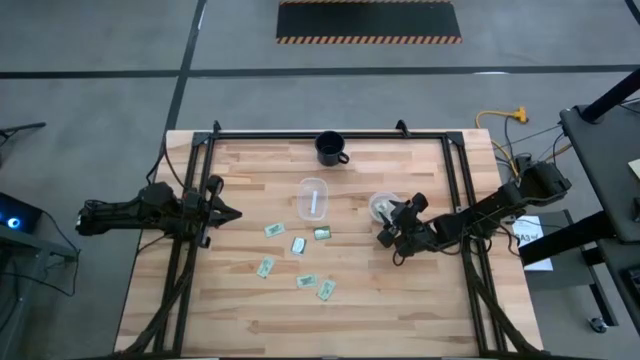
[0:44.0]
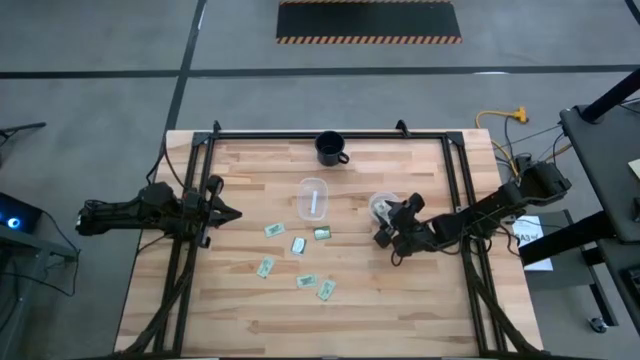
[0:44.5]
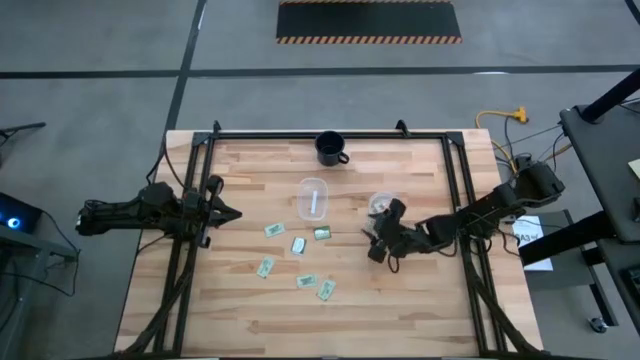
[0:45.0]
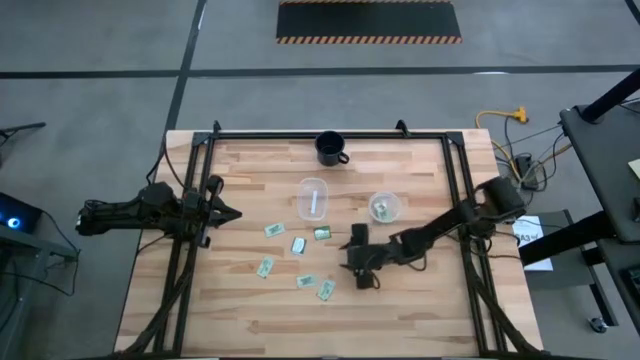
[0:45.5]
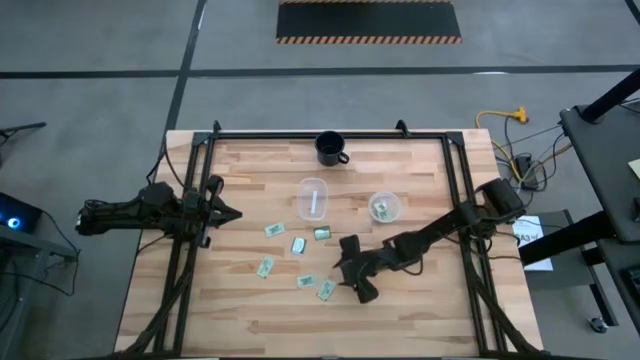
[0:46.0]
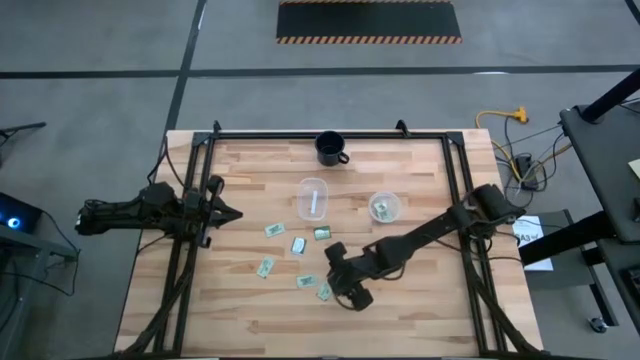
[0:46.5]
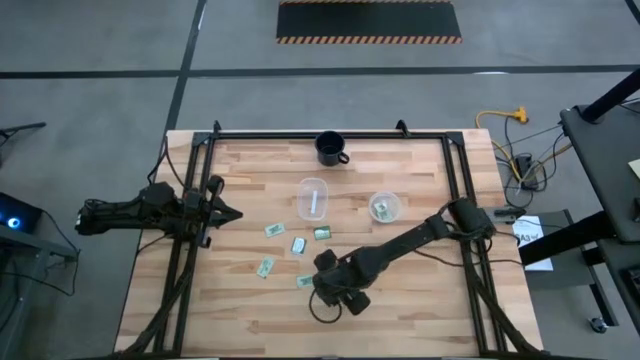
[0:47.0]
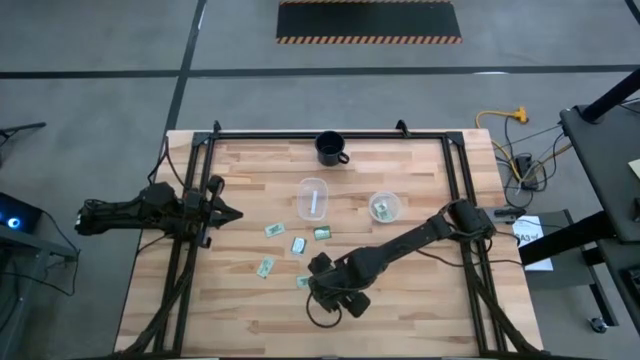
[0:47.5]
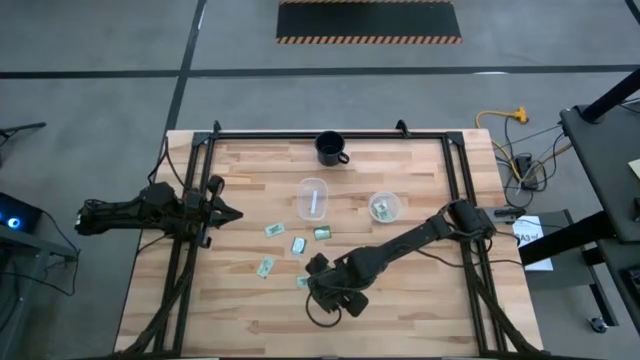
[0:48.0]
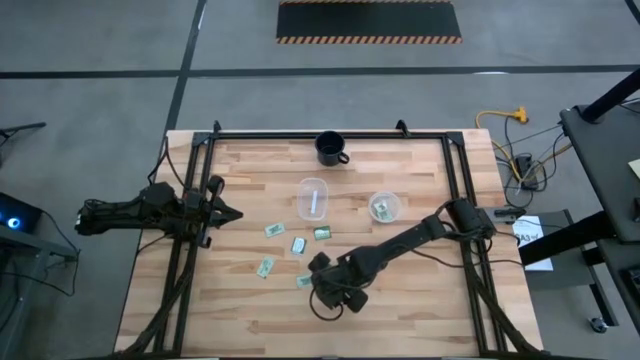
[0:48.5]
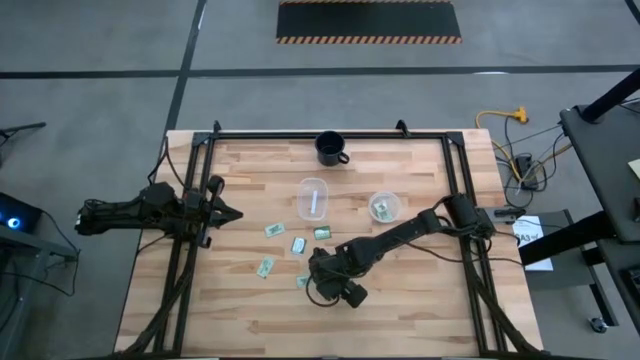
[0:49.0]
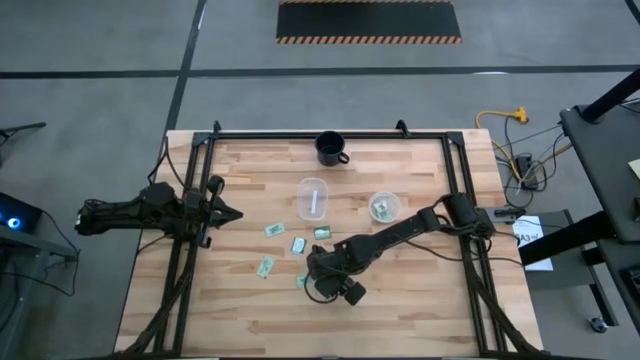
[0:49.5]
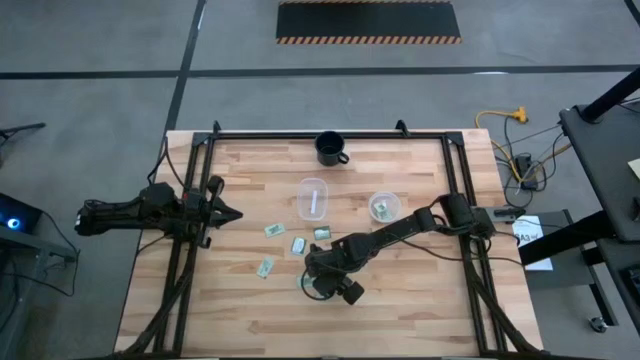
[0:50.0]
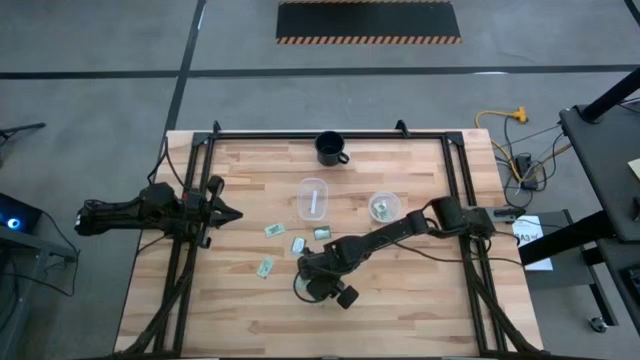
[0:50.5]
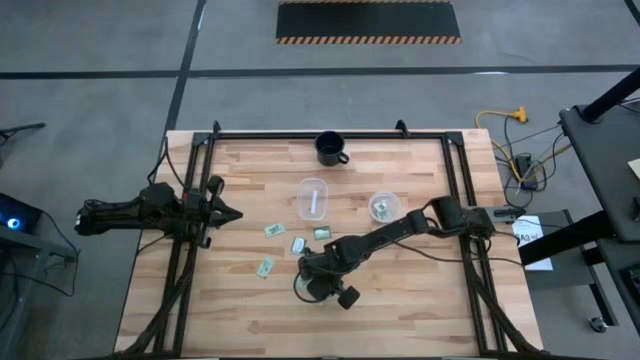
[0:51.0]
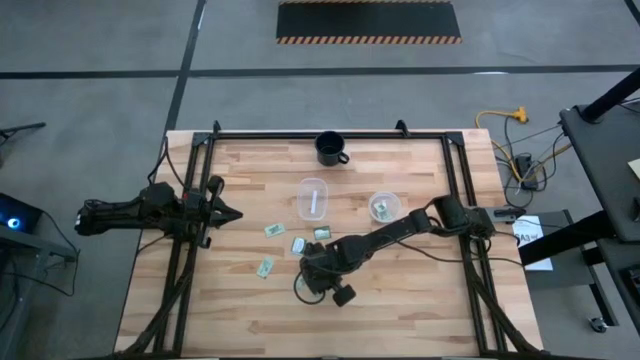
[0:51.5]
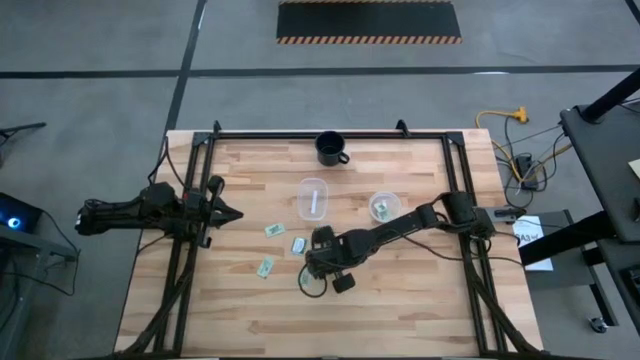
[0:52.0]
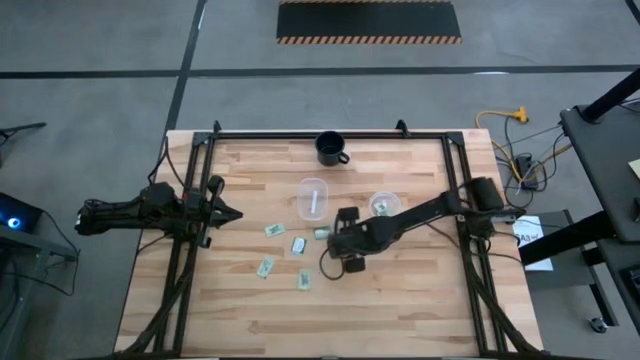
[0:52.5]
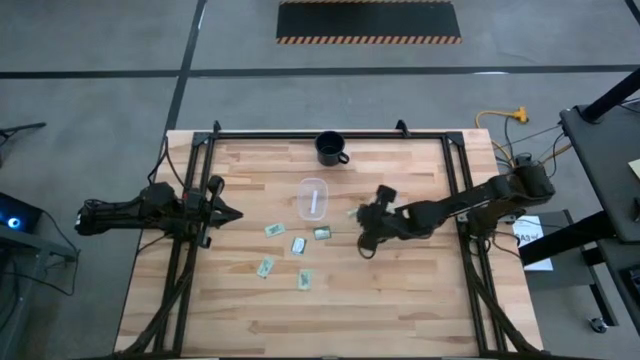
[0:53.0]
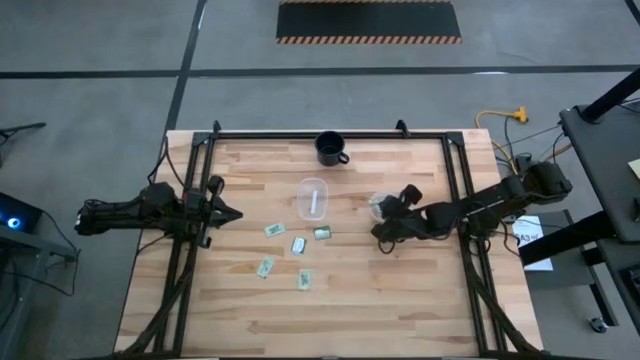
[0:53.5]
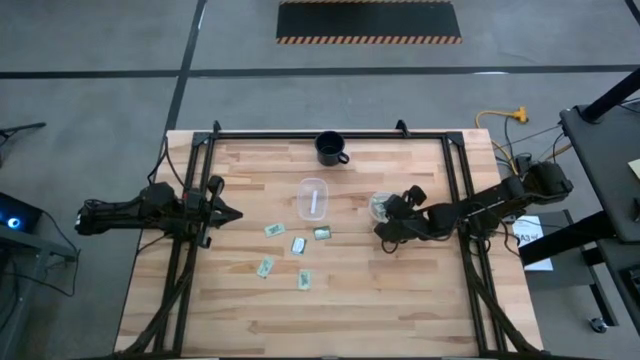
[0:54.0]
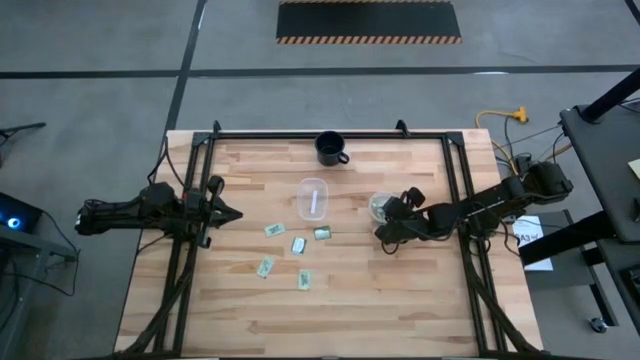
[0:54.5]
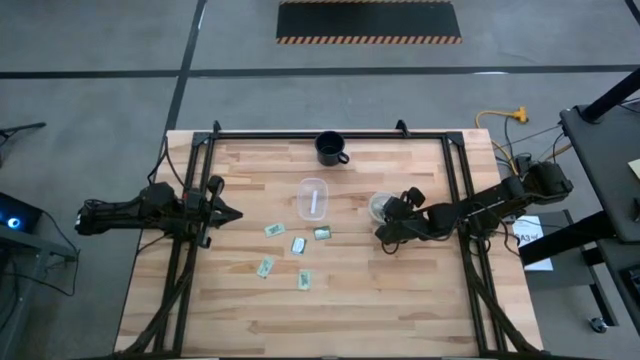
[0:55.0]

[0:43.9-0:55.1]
Task: Pick and place items into bin
Put the white stevia packet into the right transparent bin
